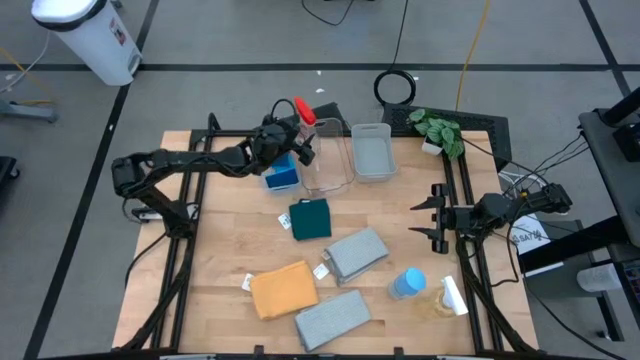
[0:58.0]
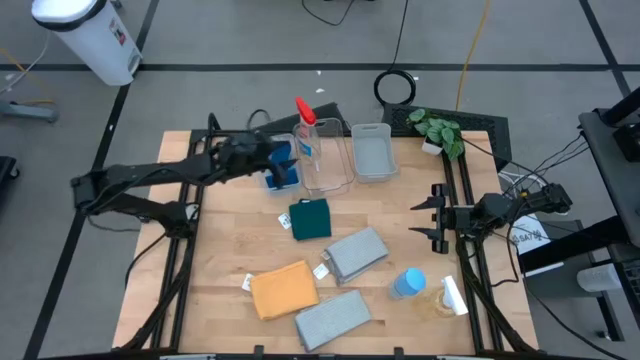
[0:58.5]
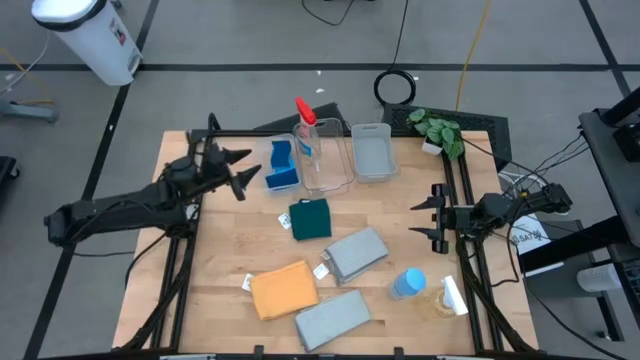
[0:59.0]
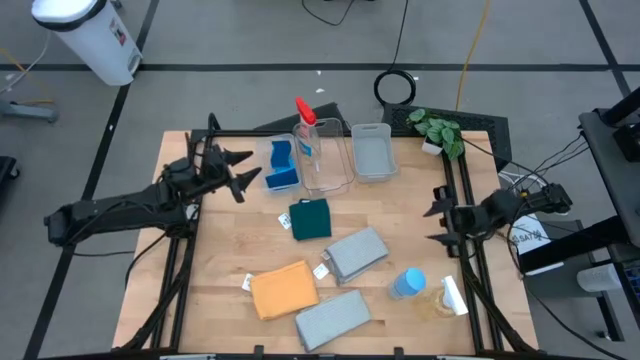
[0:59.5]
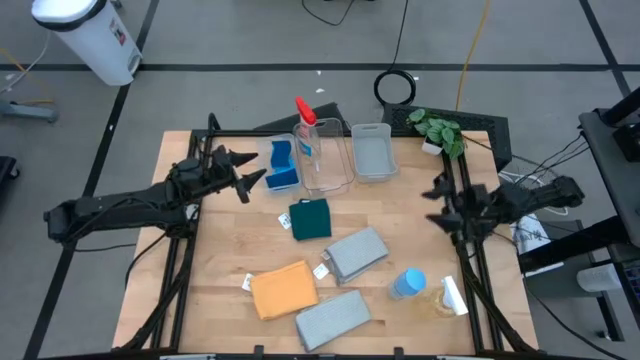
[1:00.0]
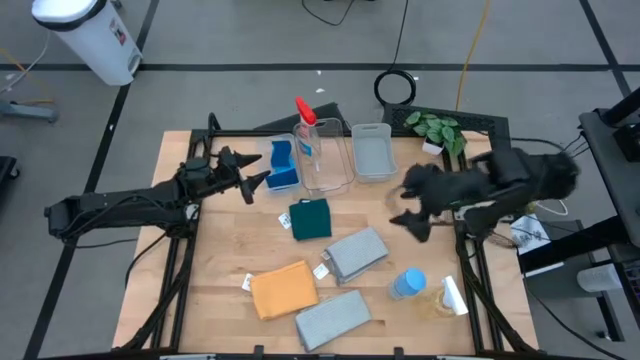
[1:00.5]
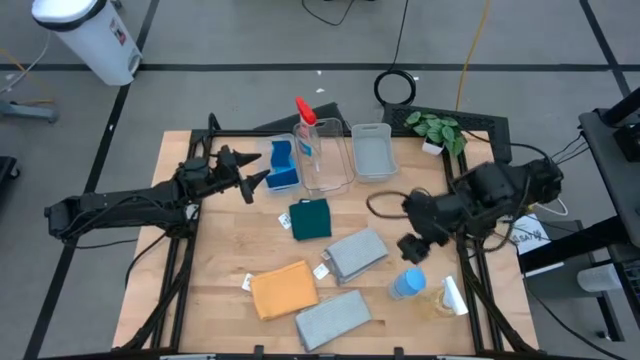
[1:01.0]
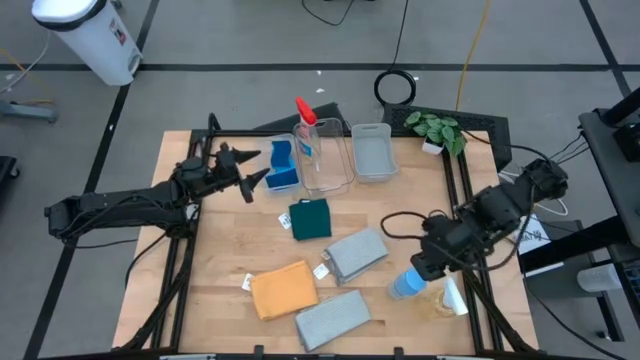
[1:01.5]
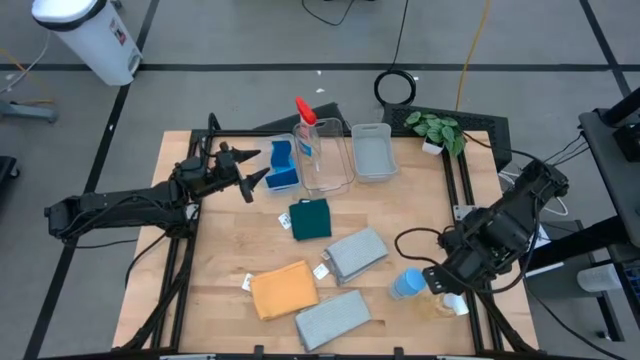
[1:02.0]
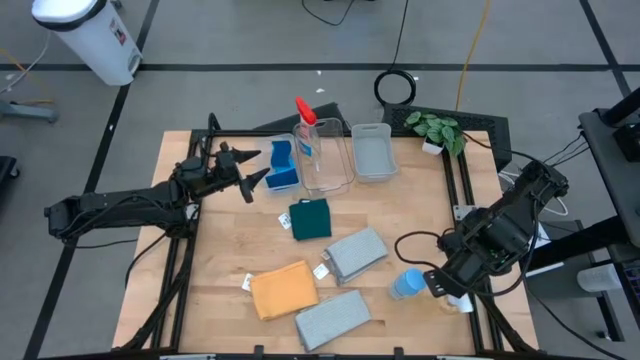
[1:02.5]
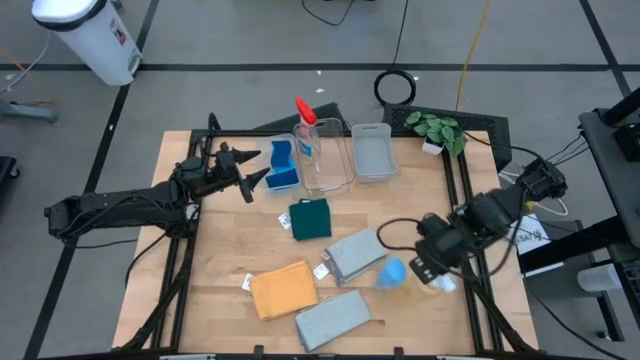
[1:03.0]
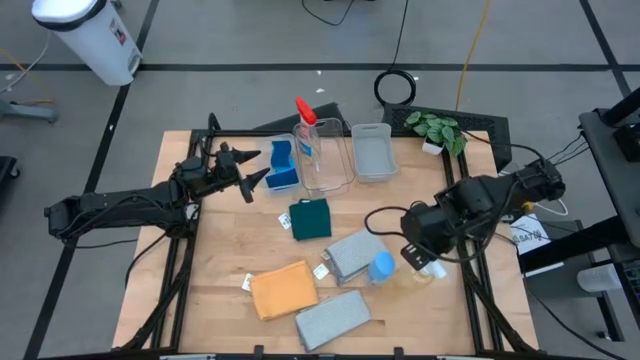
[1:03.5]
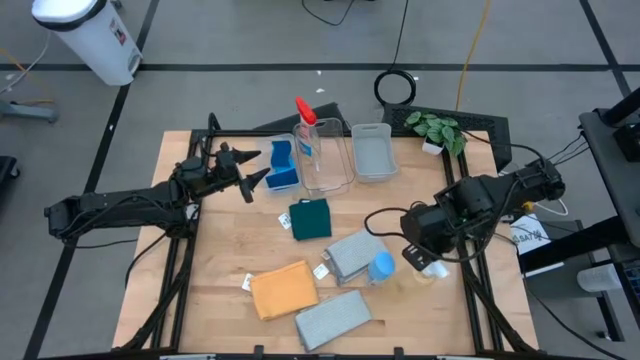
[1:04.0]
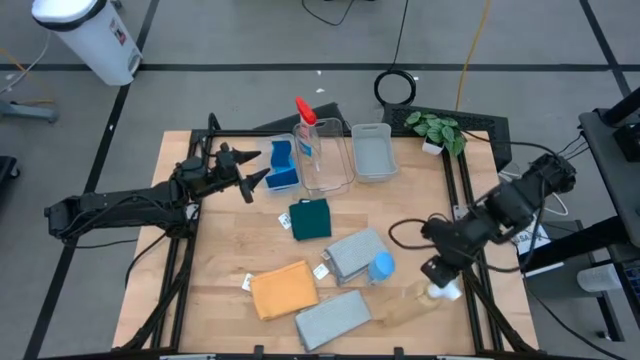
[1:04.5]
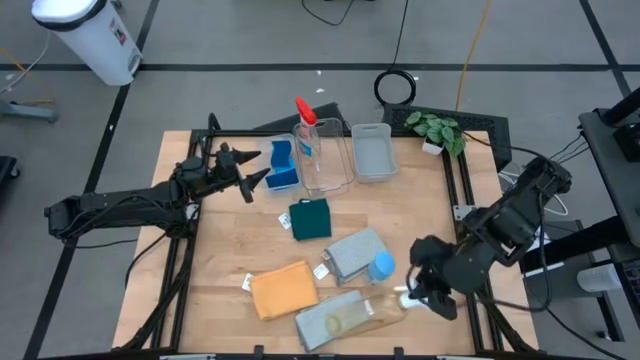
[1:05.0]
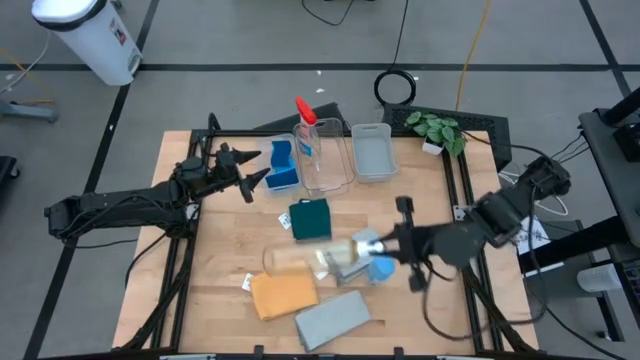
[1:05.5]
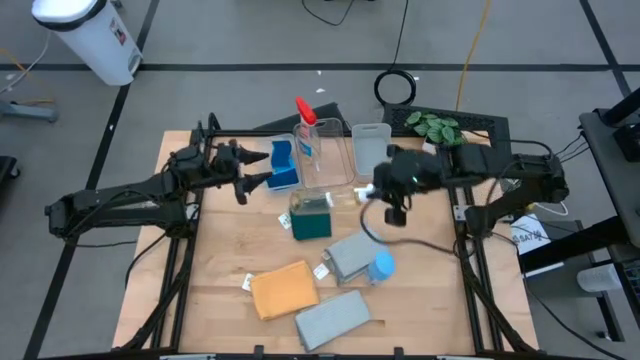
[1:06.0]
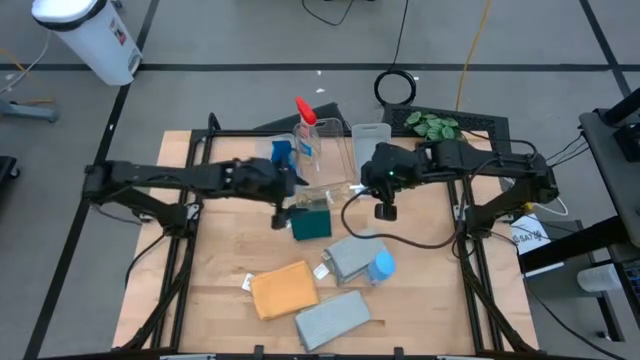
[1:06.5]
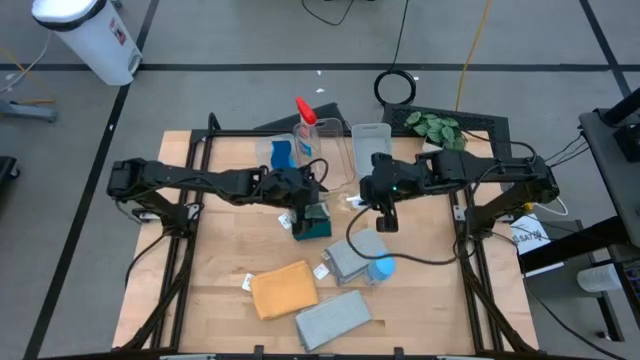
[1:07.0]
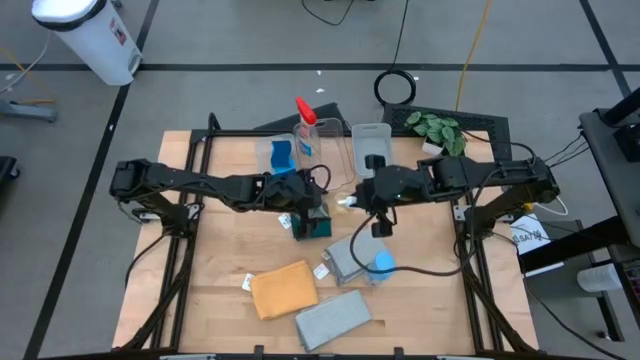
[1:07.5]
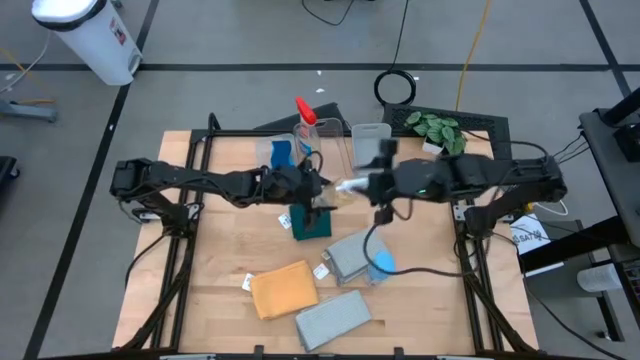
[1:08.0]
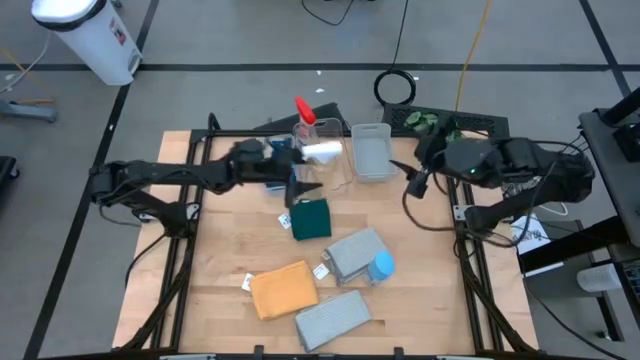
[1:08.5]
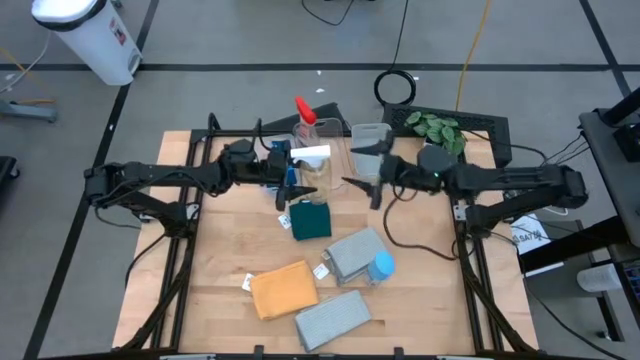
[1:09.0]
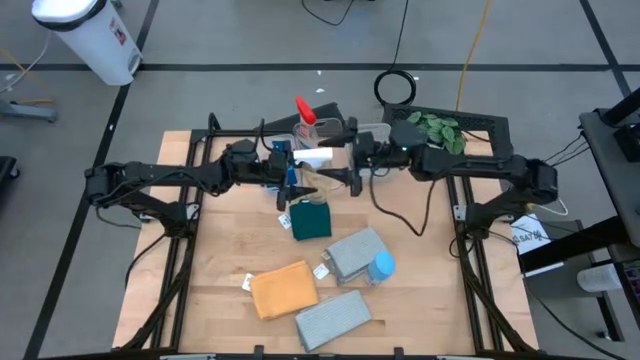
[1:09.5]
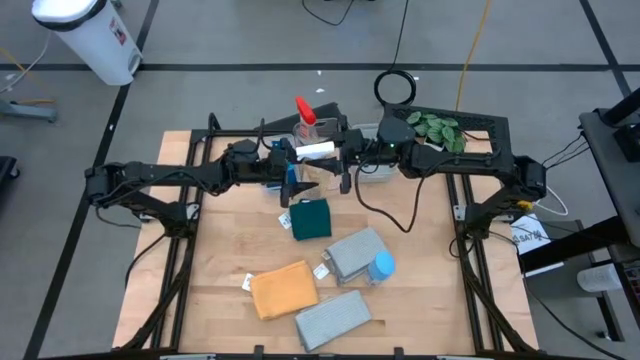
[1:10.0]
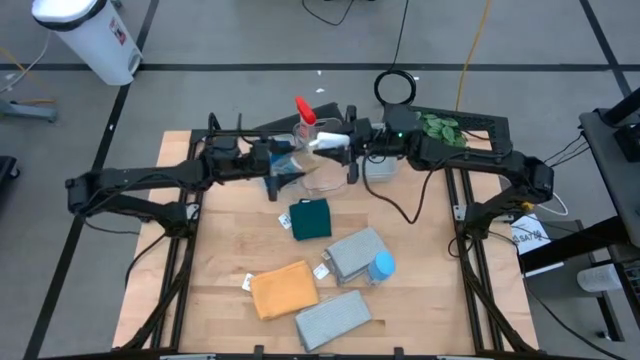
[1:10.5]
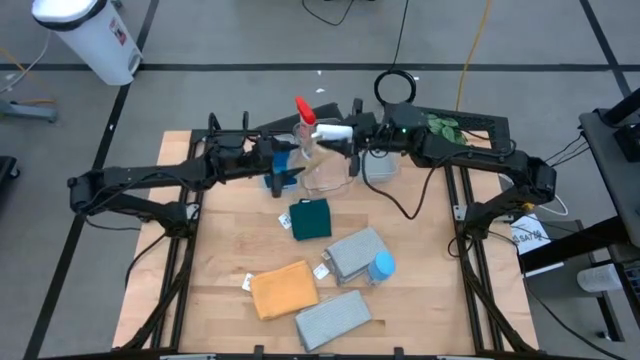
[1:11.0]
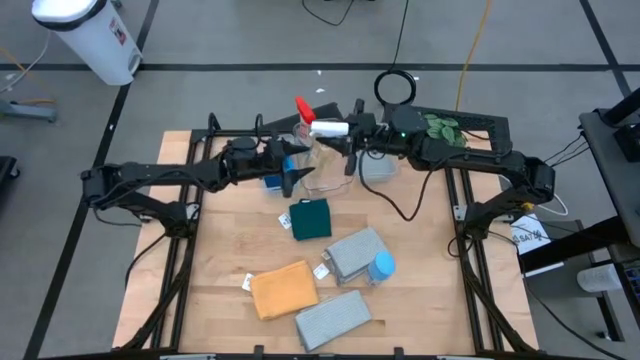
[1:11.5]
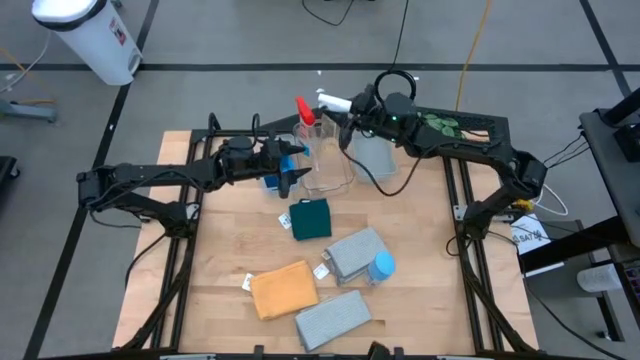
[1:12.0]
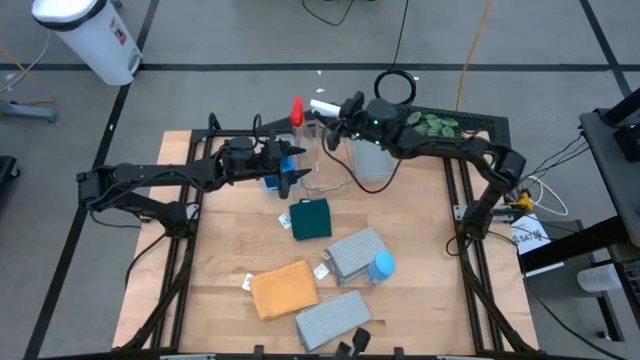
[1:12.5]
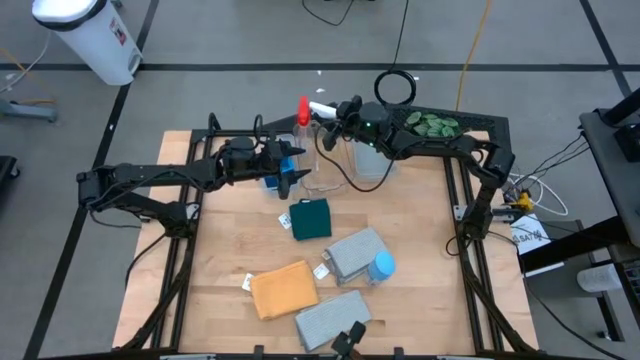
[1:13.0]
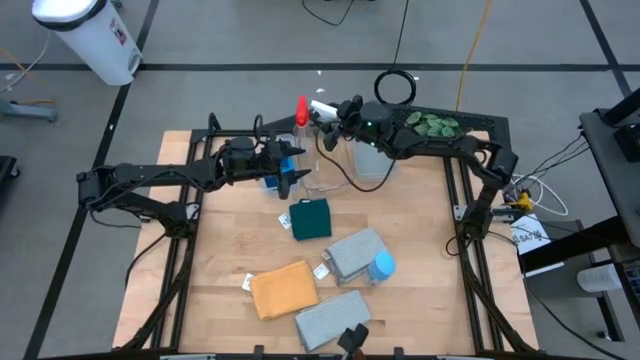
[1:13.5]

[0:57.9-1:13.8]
Task: Pick & Place Kitchen Items
Put the white spray bottle into the transparent bin

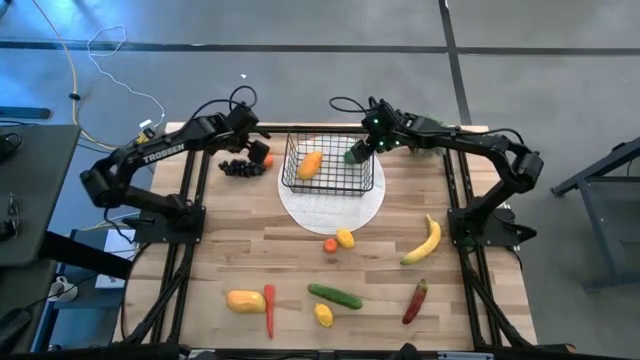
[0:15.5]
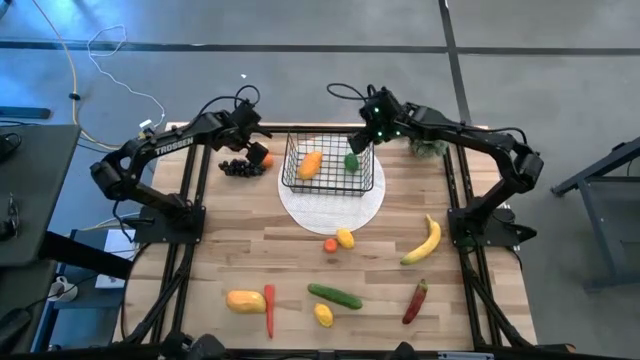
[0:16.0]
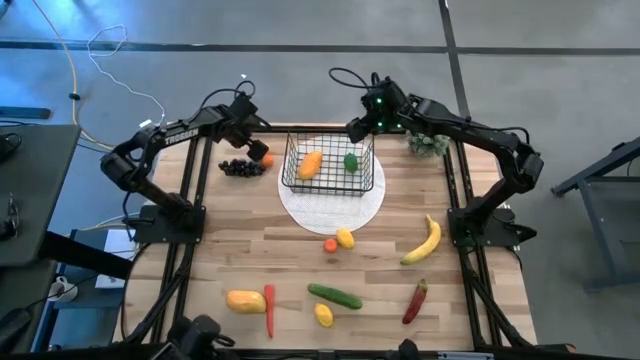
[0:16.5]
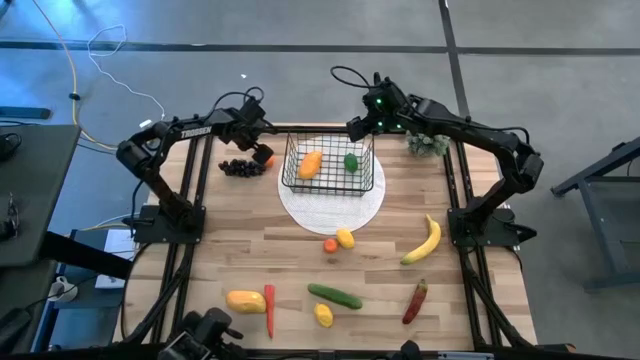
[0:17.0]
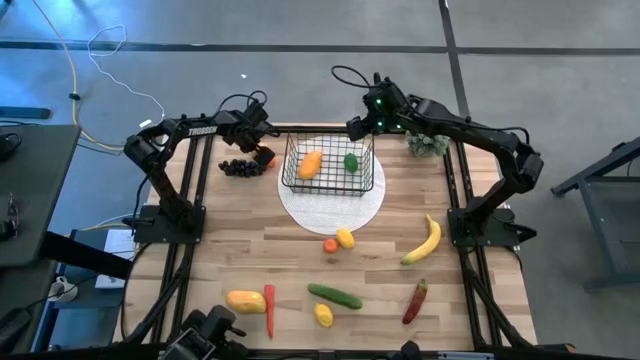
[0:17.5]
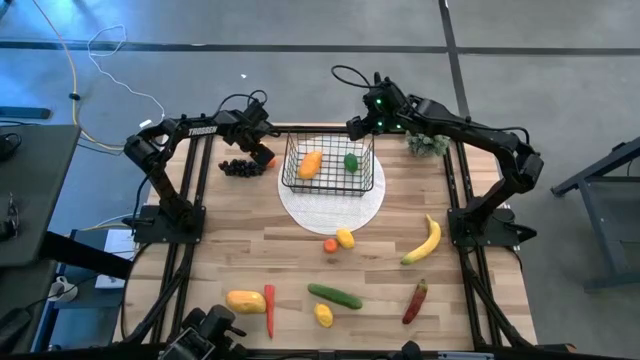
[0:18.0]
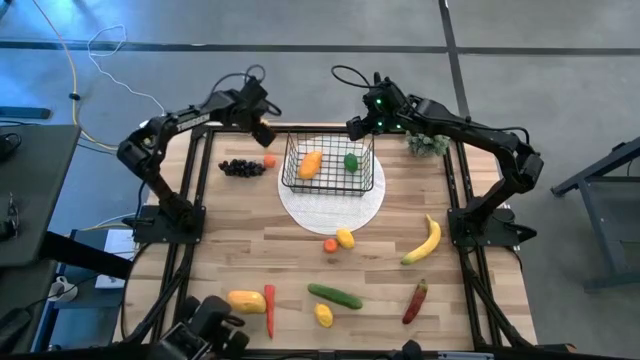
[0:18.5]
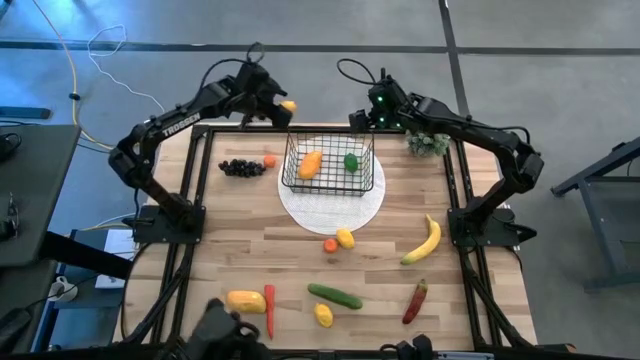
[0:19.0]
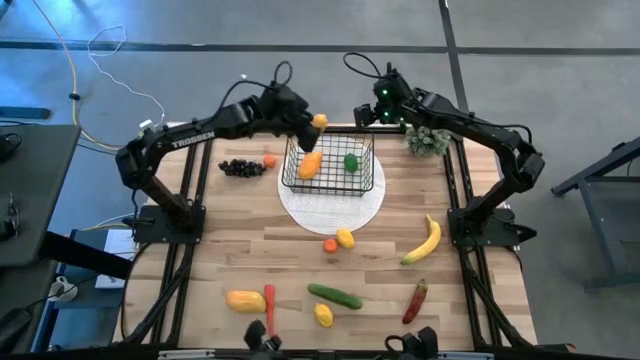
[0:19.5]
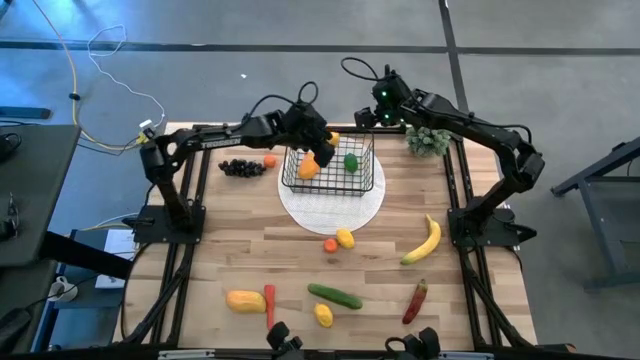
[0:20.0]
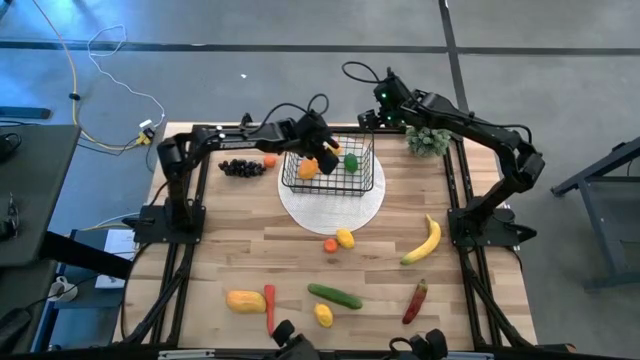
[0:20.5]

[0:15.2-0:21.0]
Task: Build produce basket
Put the top yellow lemon into the wire basket
